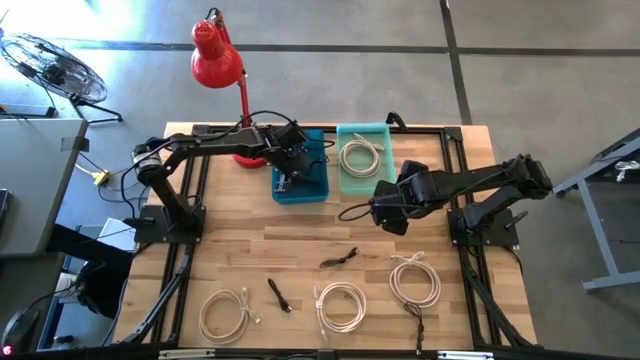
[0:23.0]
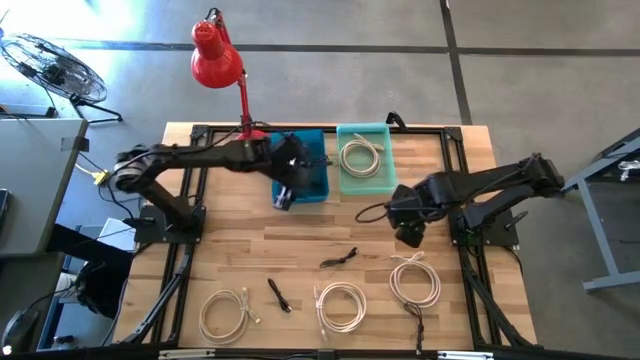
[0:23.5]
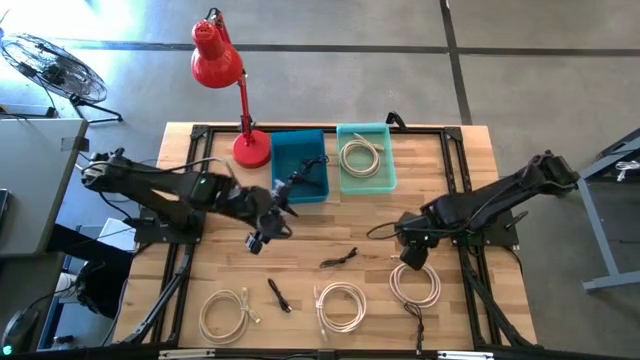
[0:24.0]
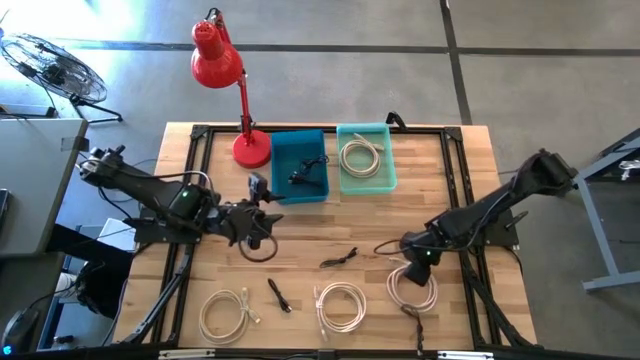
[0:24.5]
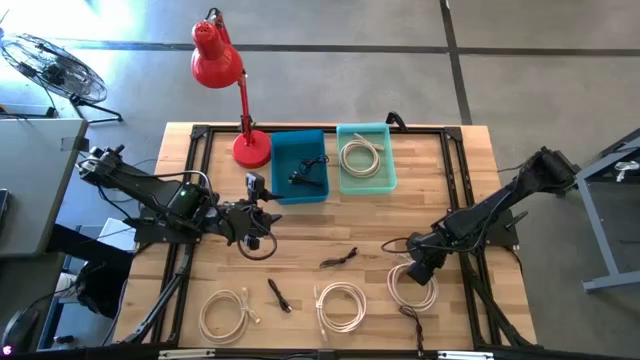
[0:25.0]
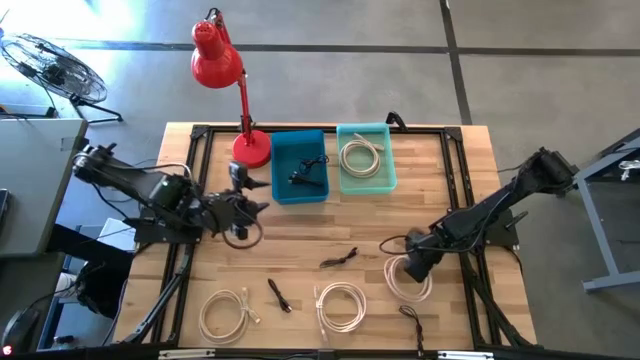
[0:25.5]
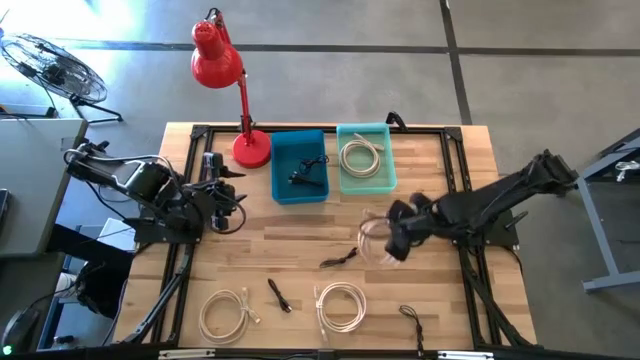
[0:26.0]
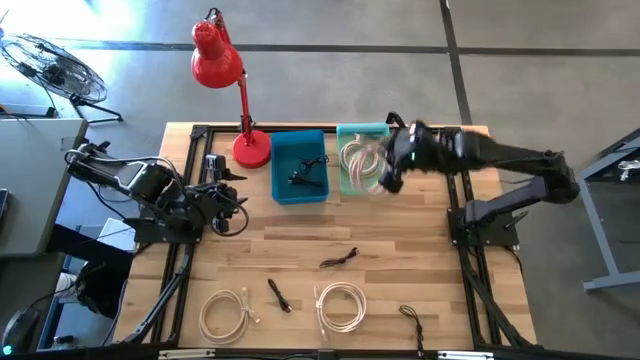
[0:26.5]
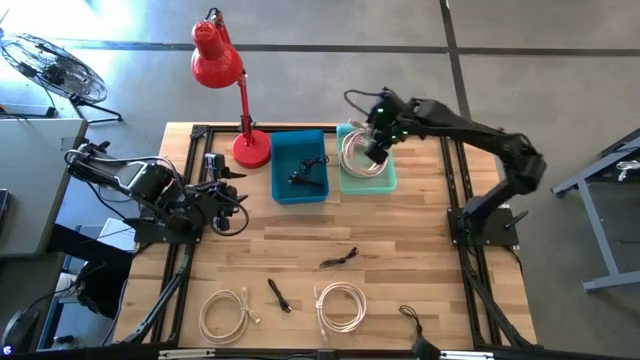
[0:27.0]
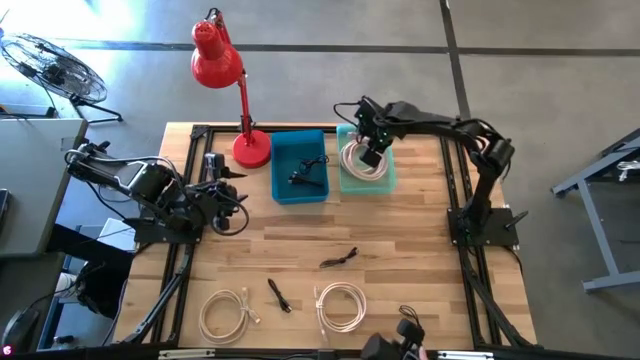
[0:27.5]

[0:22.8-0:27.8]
Task: Pick & Place USB Port
Put the white hdmi cable into the green bin

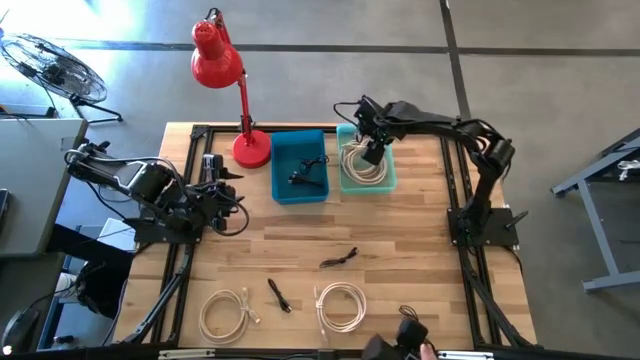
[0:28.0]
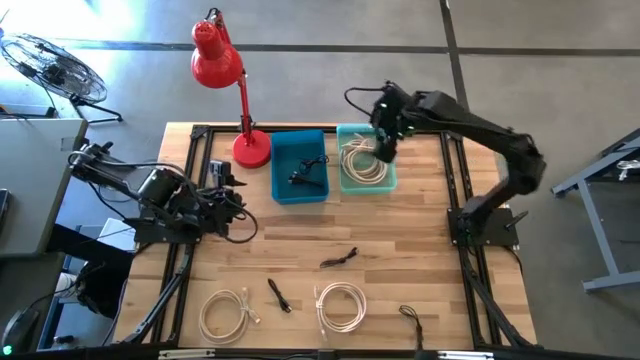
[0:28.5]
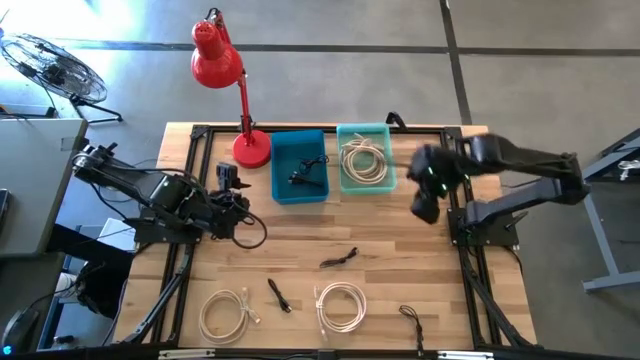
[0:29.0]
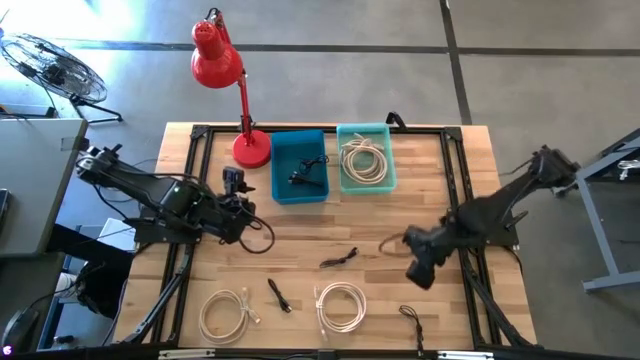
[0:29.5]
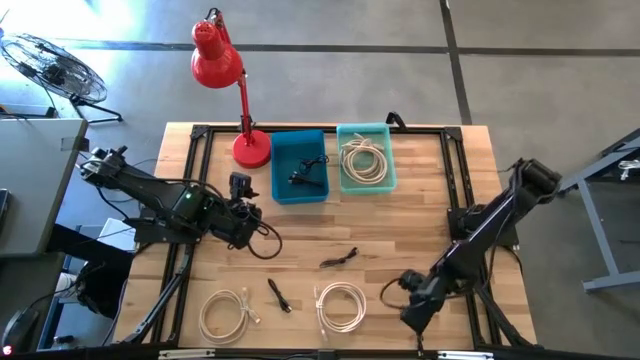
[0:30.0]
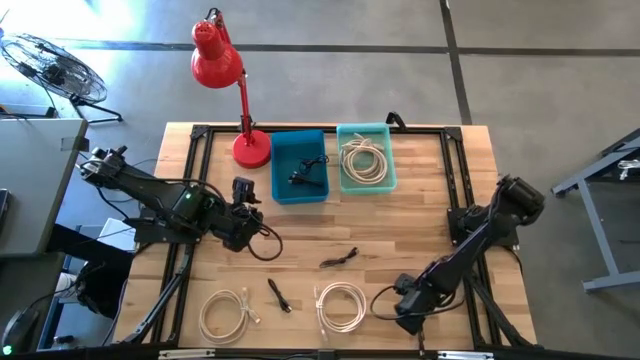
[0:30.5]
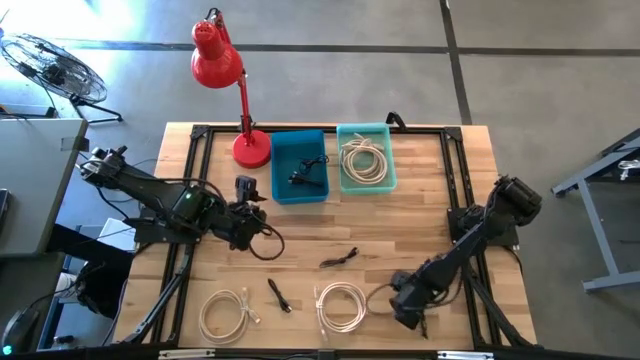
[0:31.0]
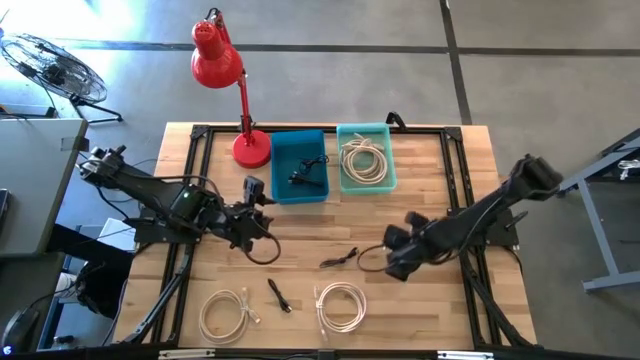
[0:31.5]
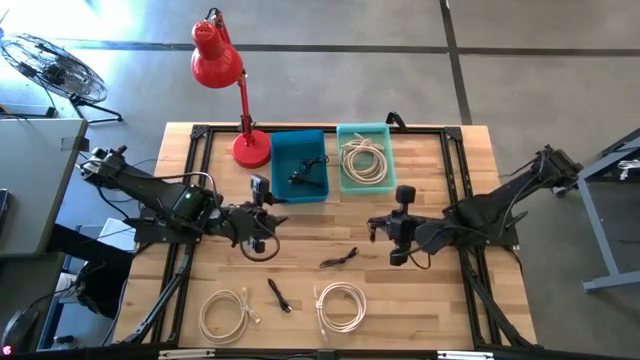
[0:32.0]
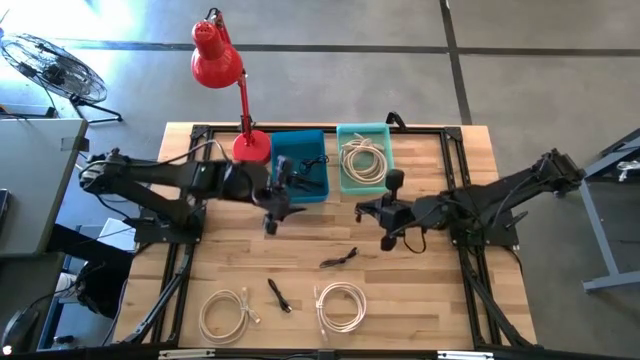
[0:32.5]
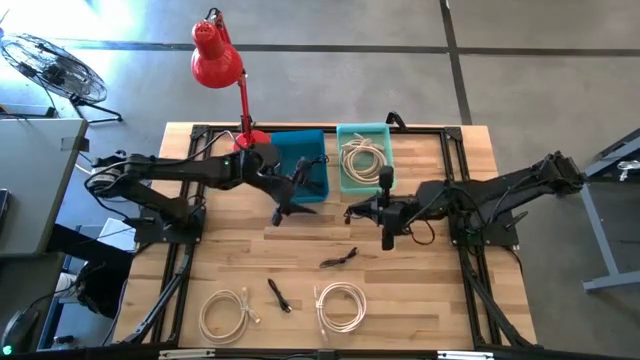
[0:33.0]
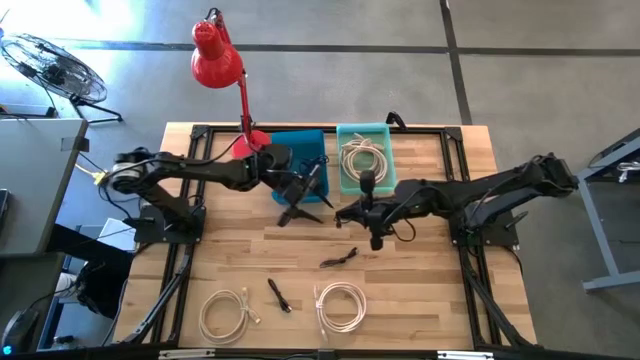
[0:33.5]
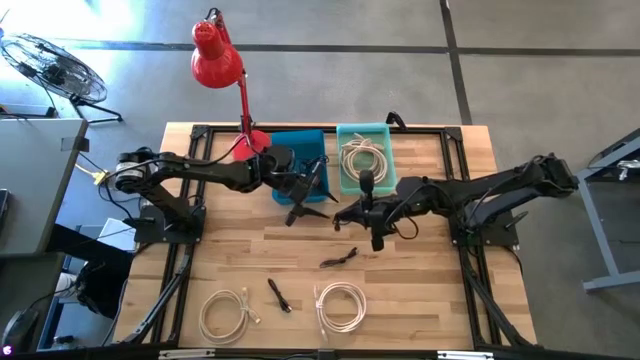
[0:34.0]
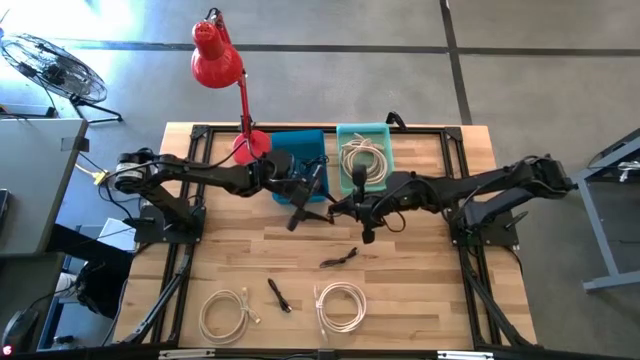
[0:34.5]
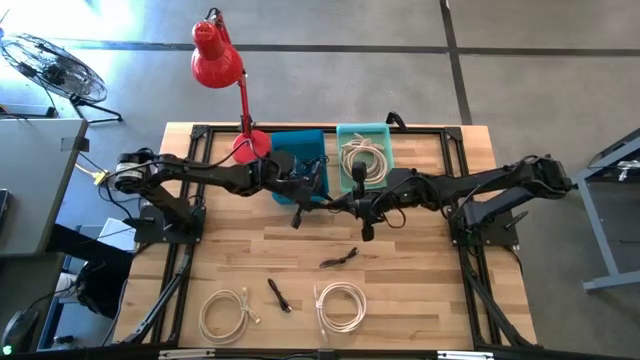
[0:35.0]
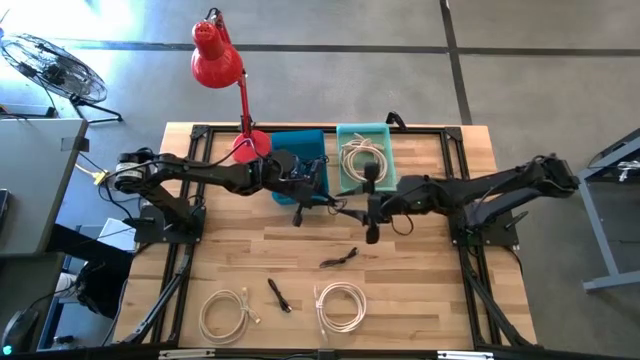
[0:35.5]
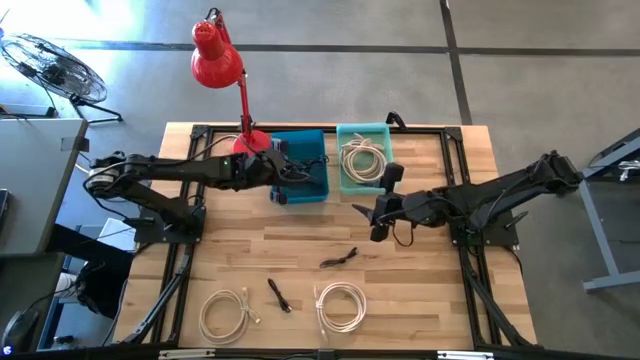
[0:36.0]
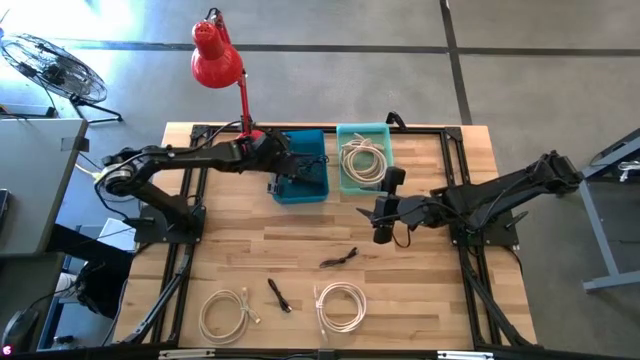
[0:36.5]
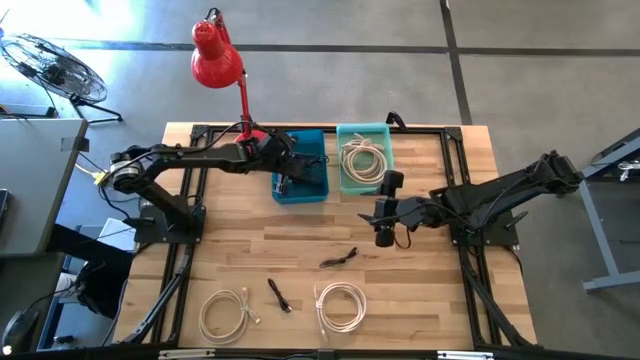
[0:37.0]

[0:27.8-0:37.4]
Put the black usb cable into the blue bin

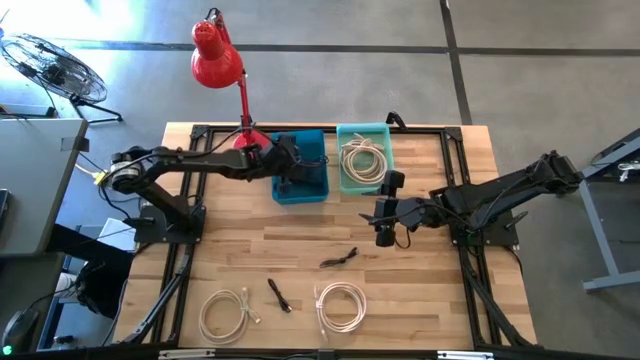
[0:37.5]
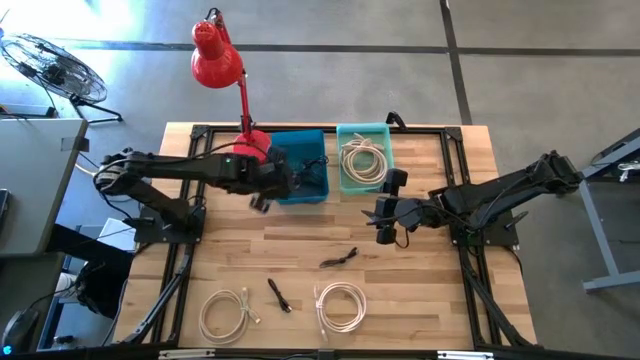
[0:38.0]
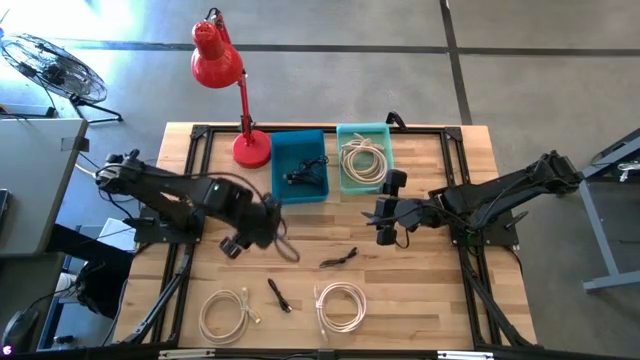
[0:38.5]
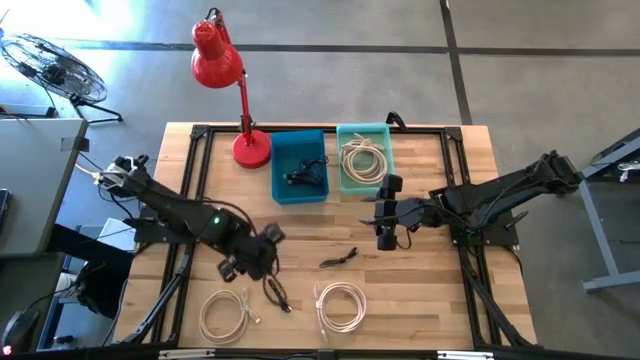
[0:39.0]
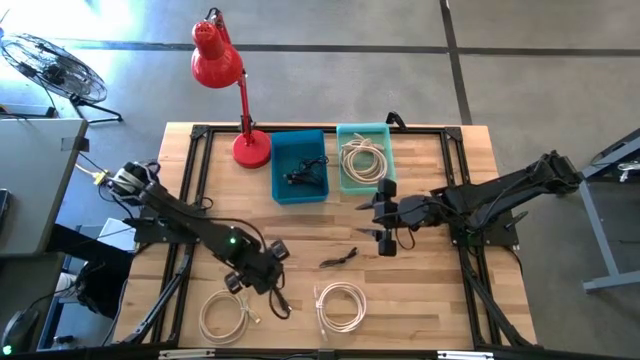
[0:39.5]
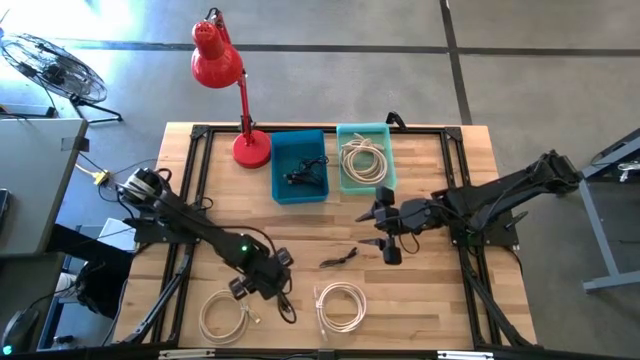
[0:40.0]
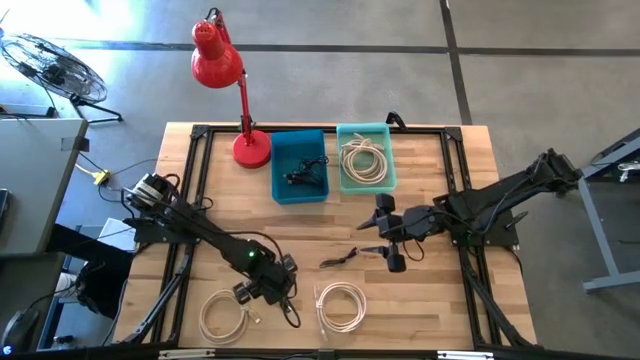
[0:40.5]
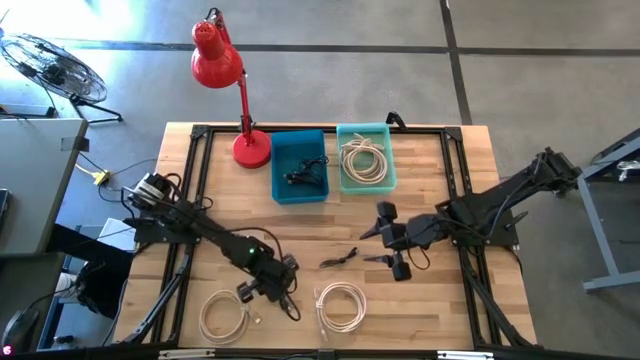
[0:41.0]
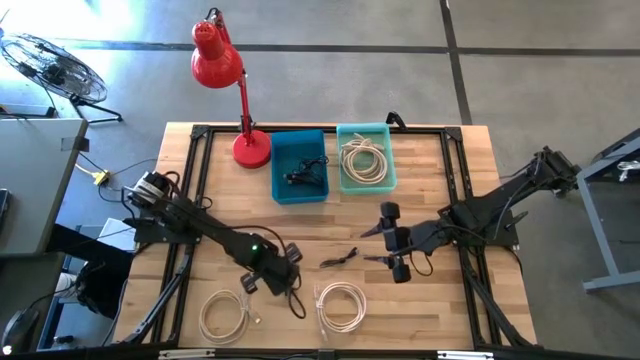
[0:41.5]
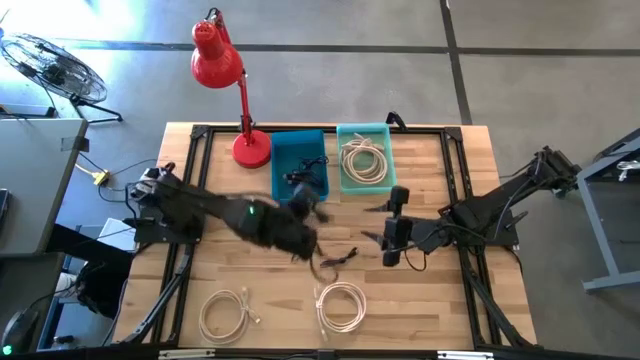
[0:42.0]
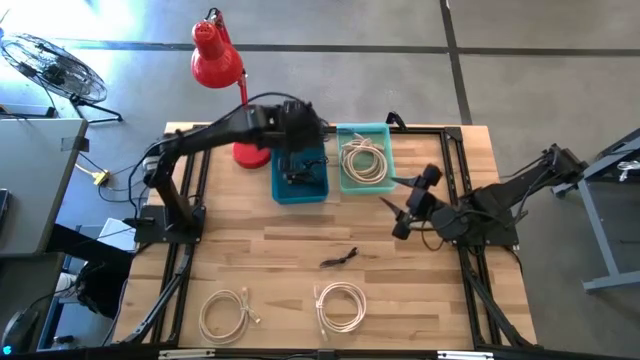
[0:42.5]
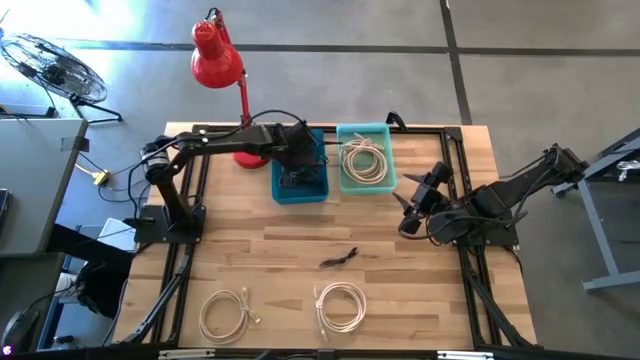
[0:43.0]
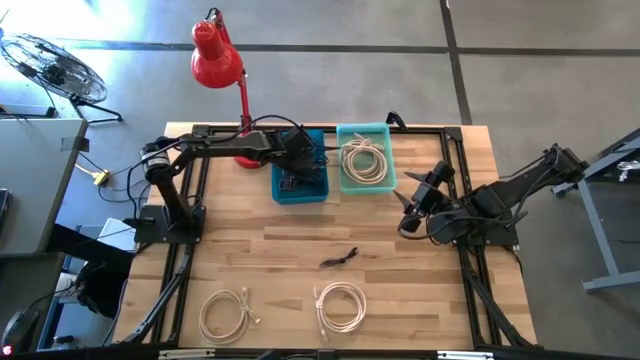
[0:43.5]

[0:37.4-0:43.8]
Put the black usb cable into the blue bin
